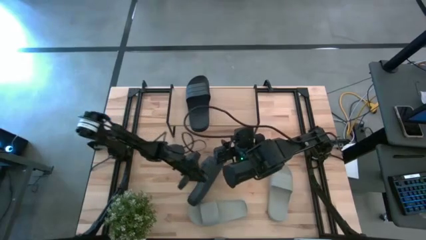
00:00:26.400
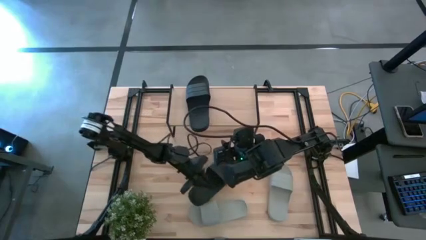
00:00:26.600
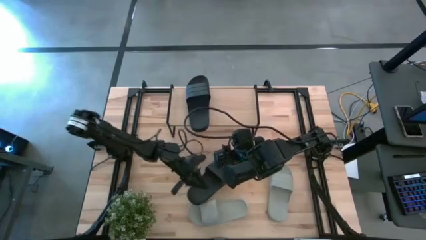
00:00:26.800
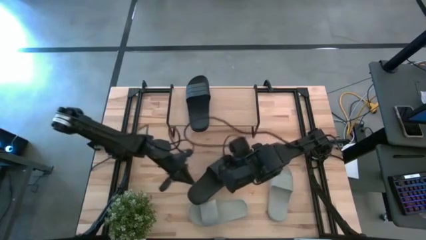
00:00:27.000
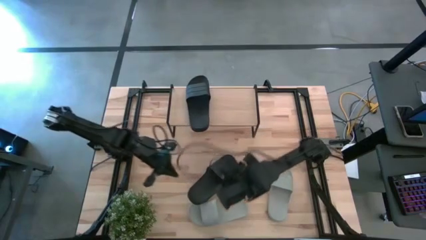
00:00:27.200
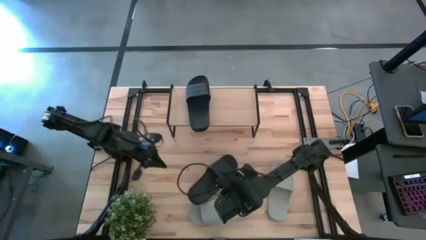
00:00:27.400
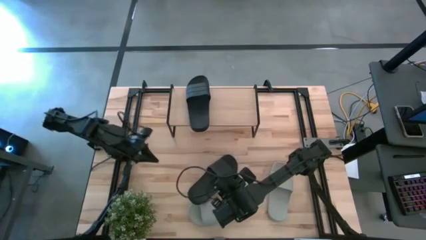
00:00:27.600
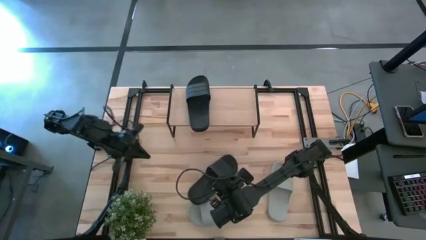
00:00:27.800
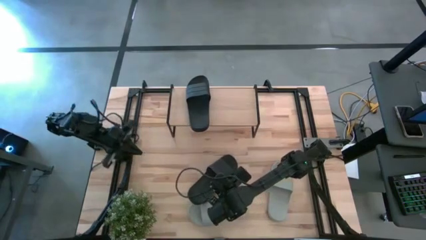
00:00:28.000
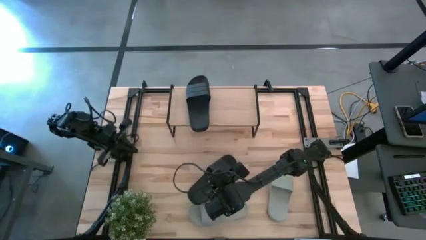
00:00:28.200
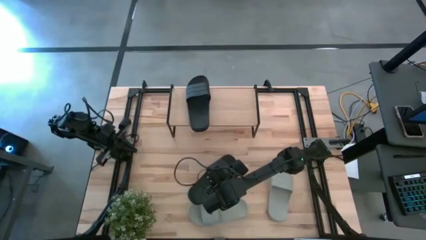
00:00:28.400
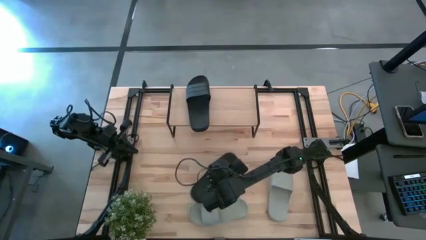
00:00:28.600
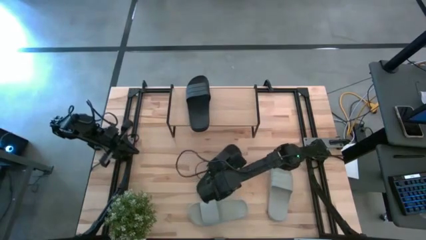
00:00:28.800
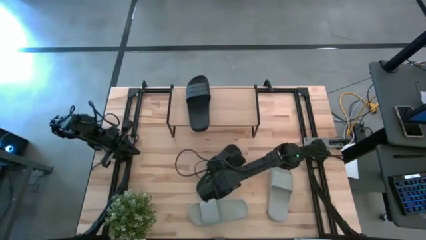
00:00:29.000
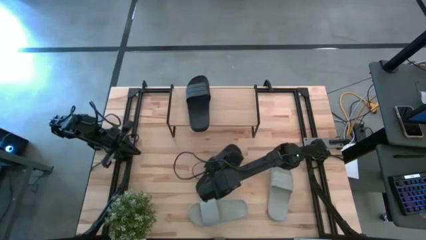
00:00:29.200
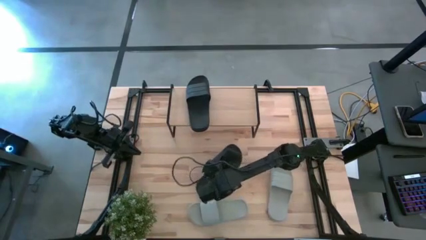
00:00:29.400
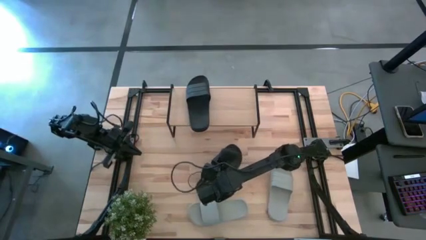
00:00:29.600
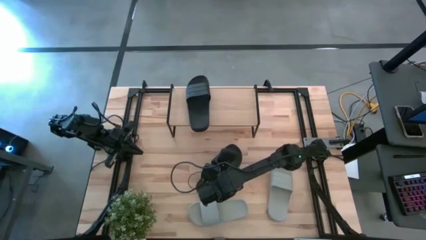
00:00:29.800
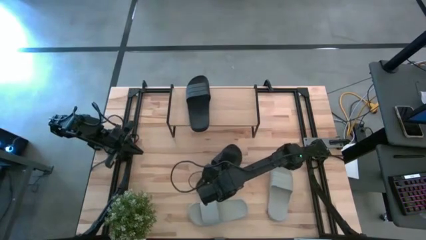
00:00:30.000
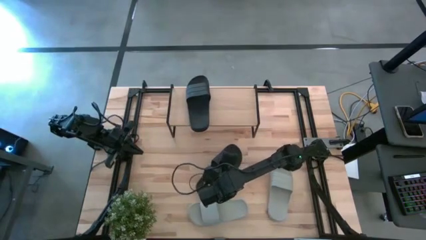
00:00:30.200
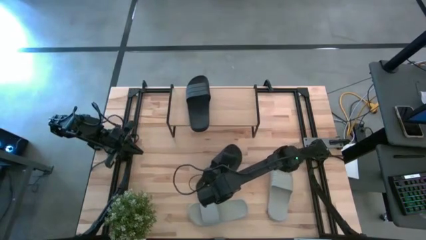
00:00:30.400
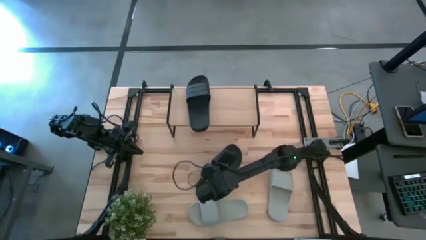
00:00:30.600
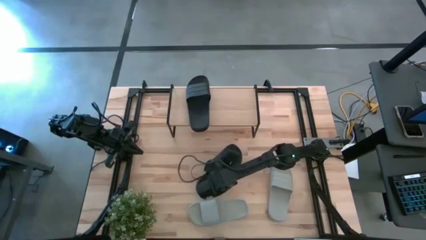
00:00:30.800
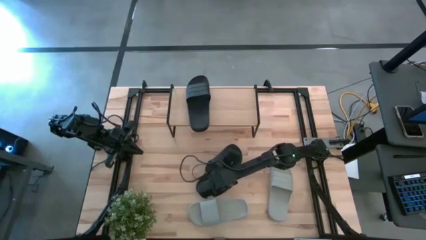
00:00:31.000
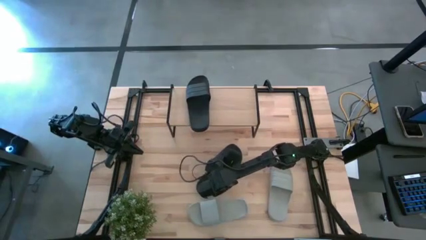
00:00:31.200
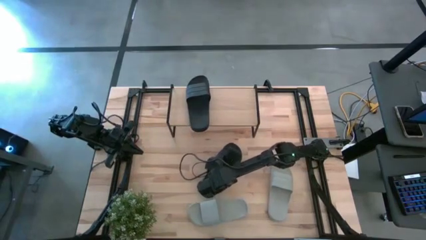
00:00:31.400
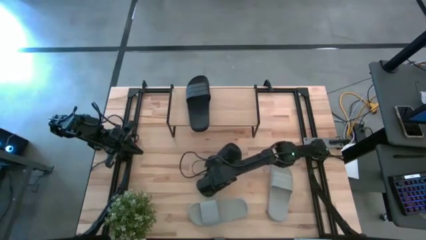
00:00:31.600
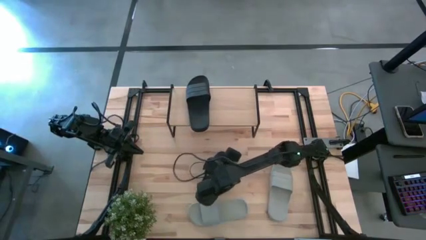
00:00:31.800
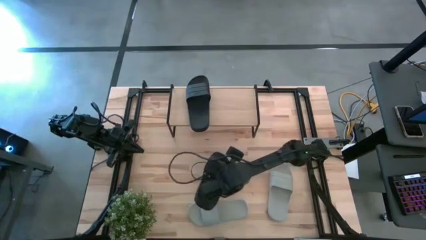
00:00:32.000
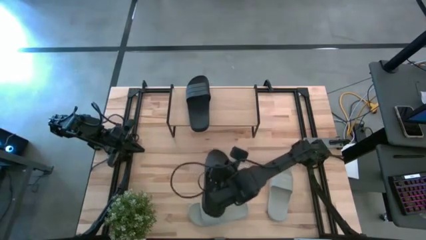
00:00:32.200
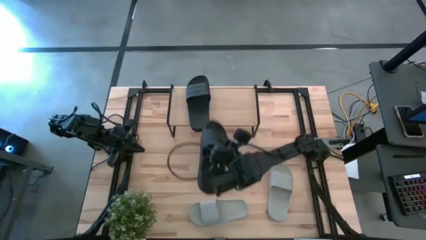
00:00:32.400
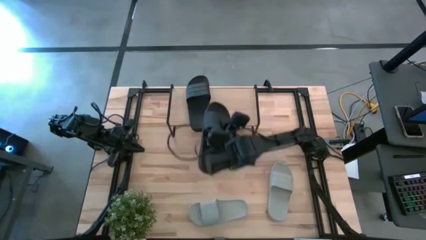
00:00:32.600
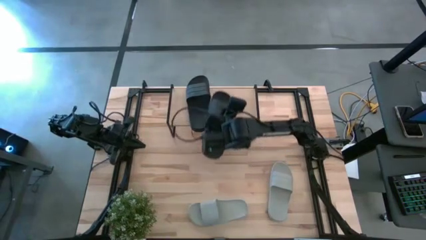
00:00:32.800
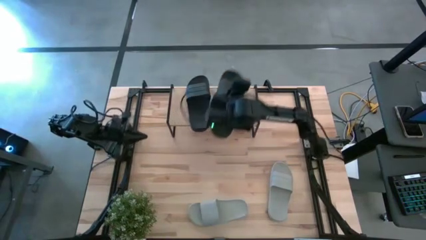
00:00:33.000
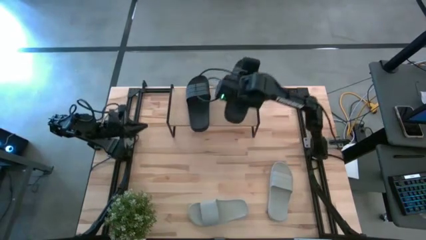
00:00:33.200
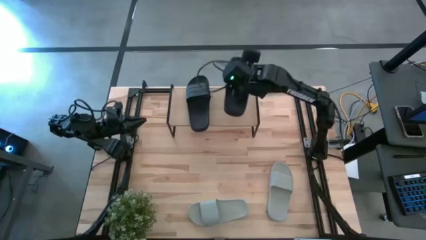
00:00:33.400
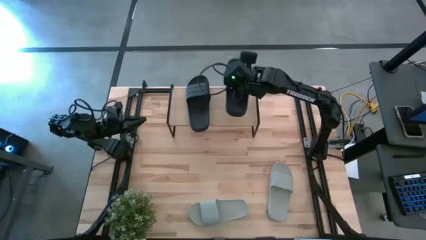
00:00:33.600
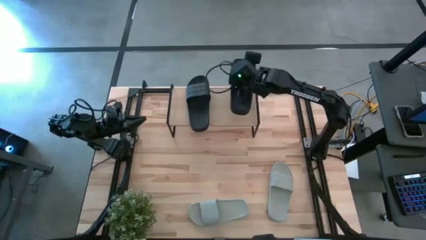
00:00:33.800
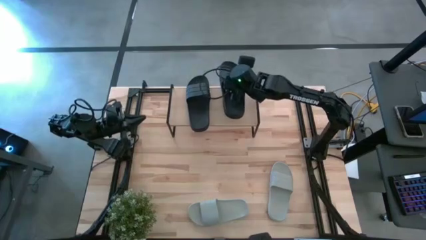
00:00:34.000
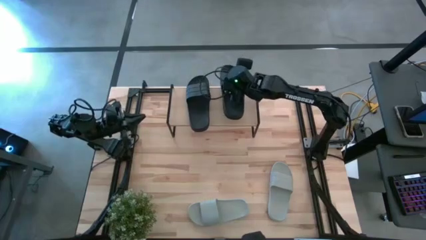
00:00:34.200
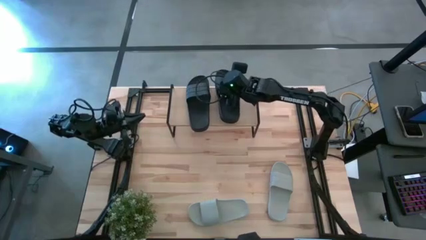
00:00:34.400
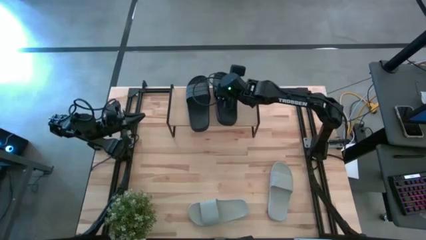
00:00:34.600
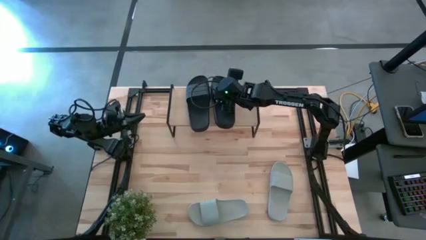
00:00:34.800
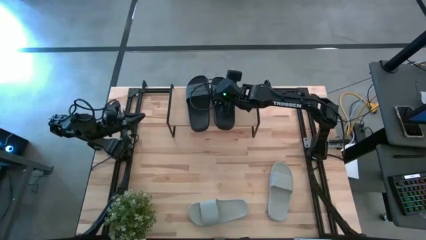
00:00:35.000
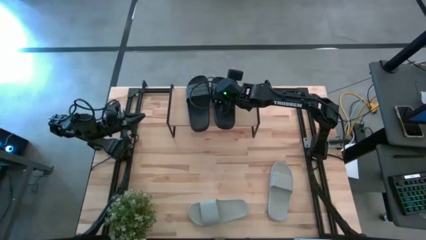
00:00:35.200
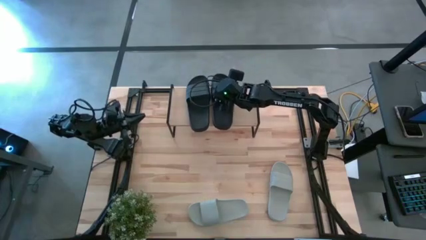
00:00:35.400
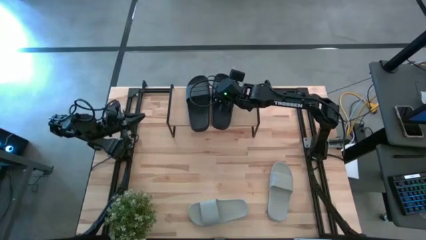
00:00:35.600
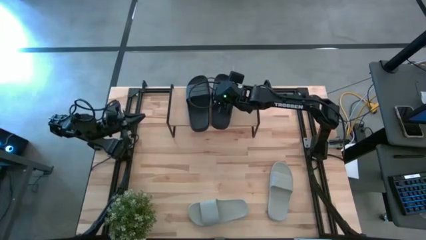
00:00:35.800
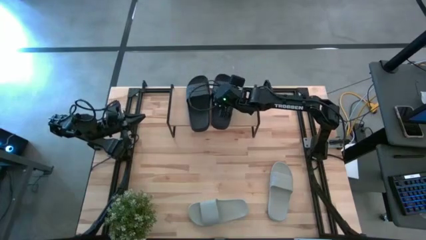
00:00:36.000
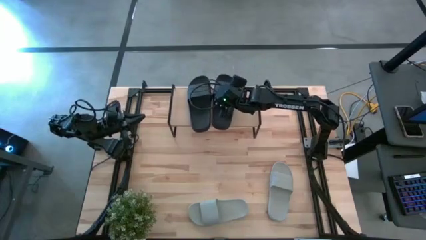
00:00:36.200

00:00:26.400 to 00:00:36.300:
Task: Pick and place slides into the shelf
Put the black slide on the shelf
